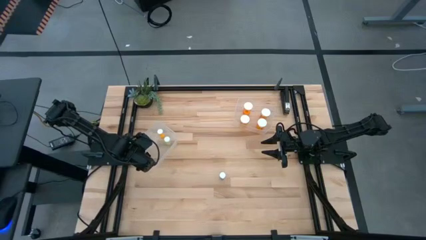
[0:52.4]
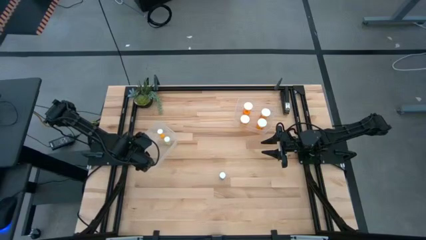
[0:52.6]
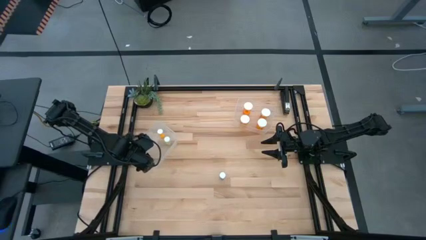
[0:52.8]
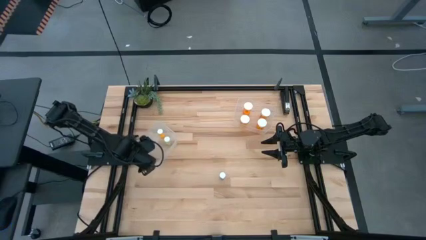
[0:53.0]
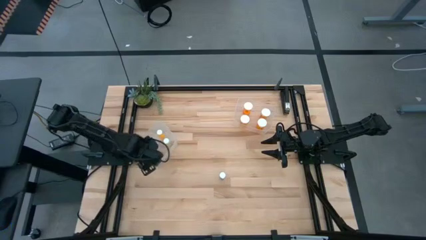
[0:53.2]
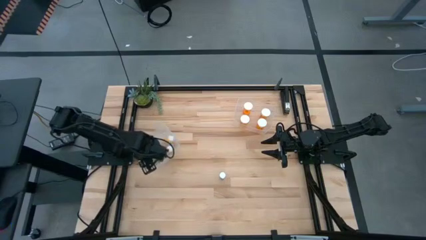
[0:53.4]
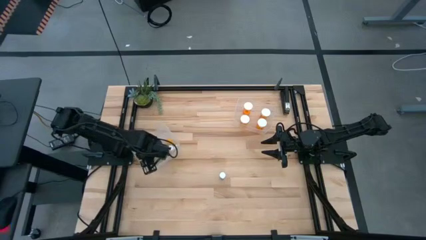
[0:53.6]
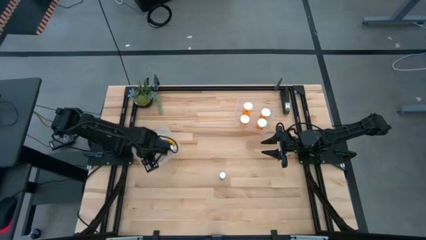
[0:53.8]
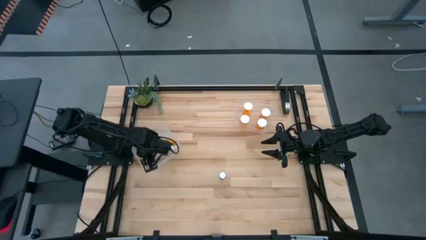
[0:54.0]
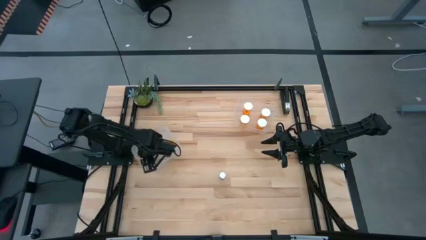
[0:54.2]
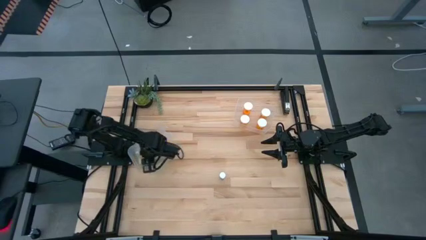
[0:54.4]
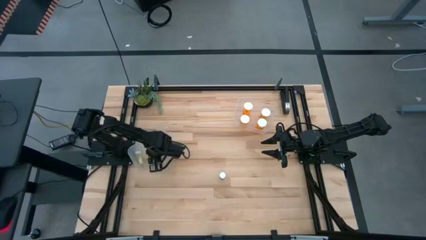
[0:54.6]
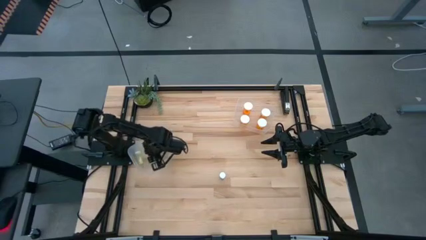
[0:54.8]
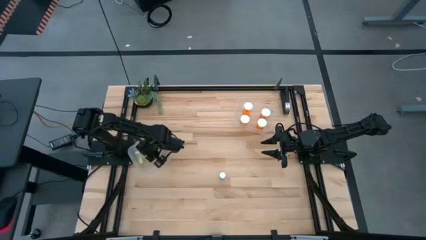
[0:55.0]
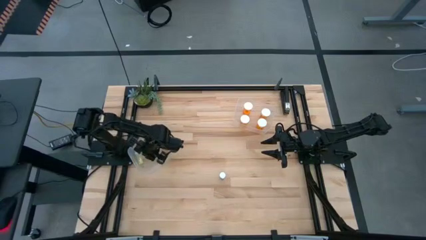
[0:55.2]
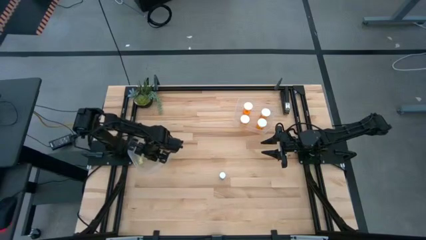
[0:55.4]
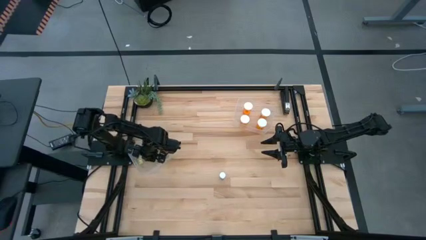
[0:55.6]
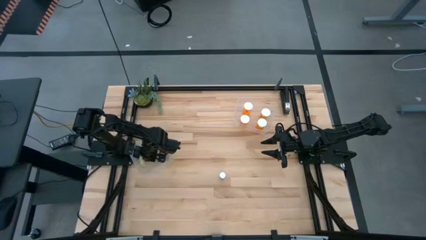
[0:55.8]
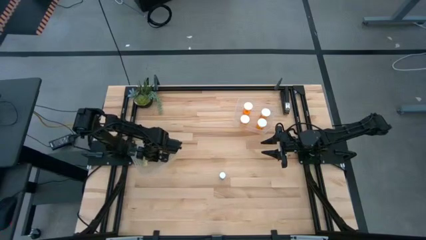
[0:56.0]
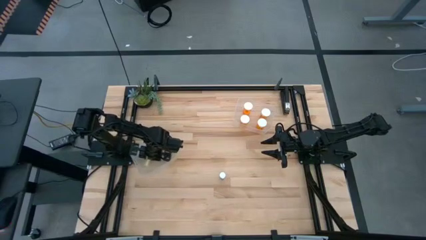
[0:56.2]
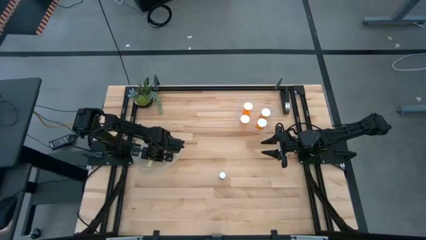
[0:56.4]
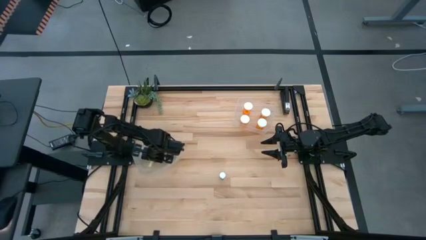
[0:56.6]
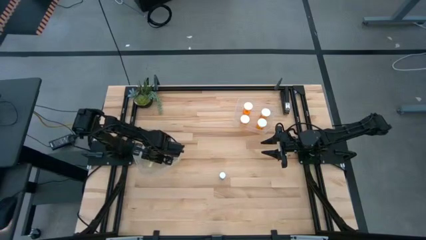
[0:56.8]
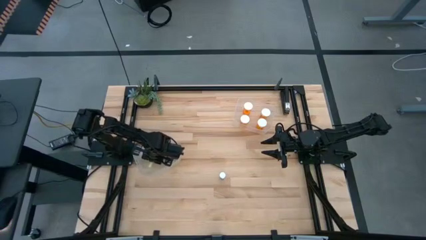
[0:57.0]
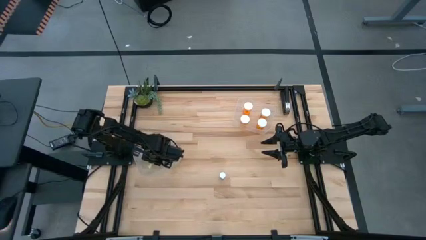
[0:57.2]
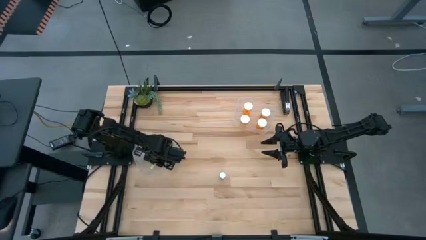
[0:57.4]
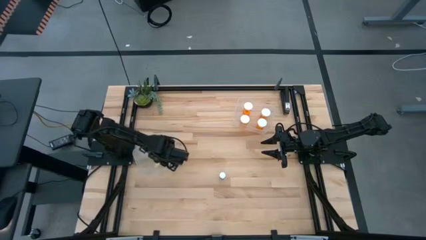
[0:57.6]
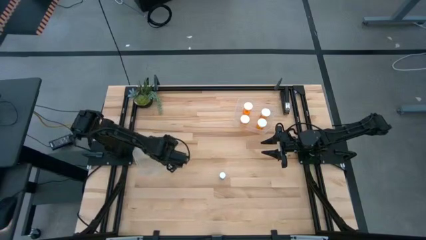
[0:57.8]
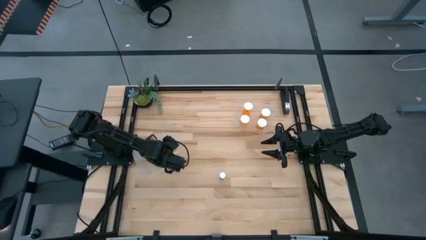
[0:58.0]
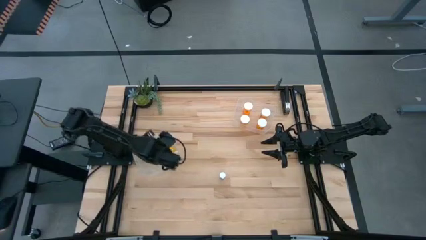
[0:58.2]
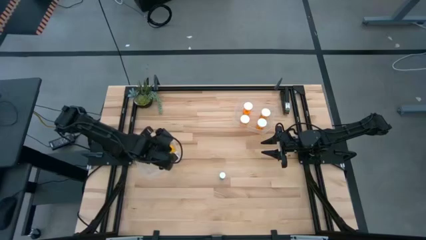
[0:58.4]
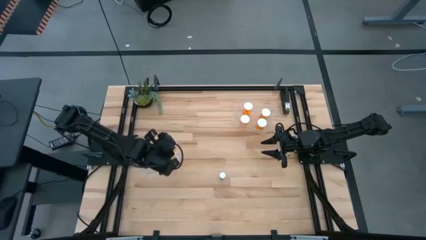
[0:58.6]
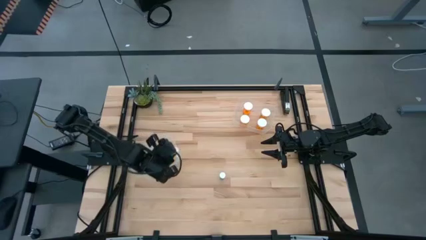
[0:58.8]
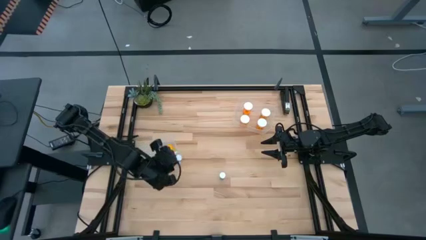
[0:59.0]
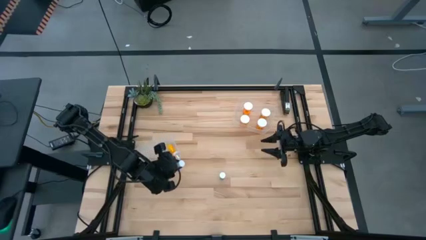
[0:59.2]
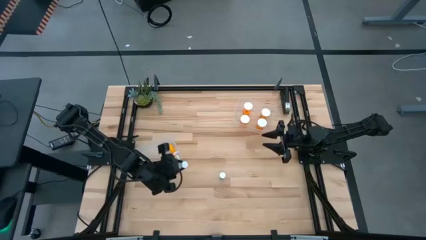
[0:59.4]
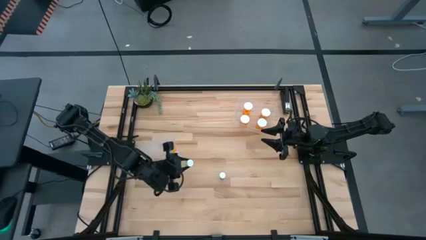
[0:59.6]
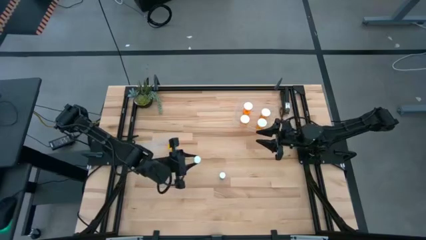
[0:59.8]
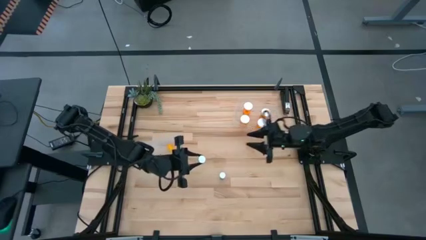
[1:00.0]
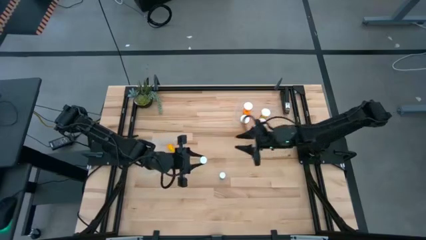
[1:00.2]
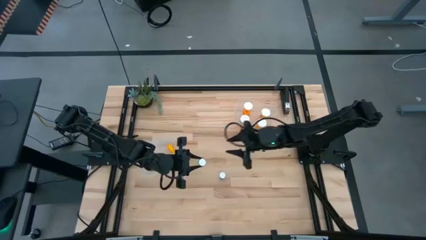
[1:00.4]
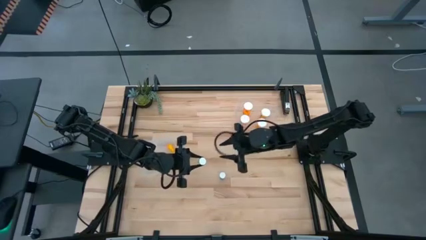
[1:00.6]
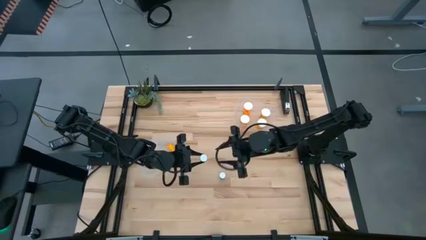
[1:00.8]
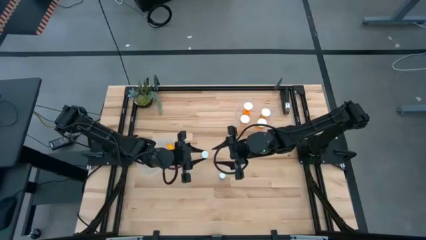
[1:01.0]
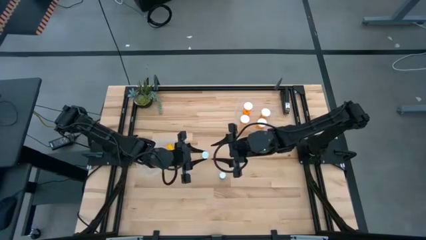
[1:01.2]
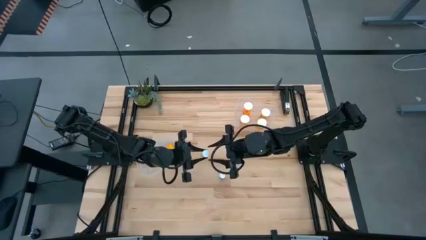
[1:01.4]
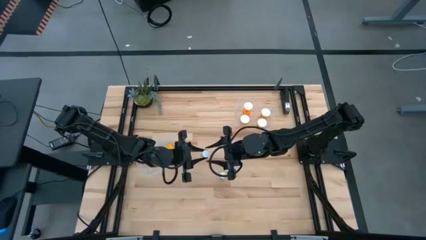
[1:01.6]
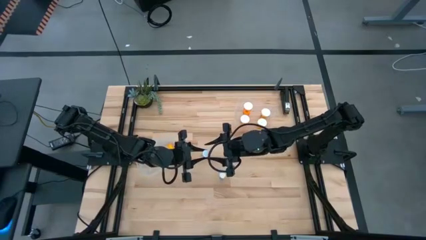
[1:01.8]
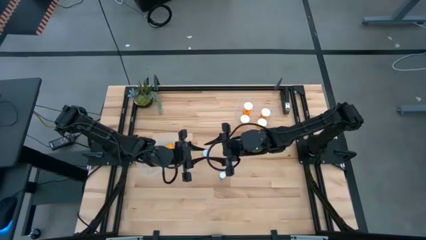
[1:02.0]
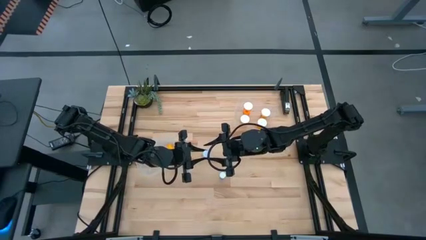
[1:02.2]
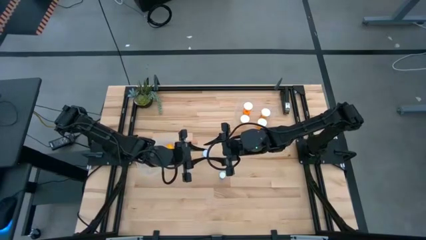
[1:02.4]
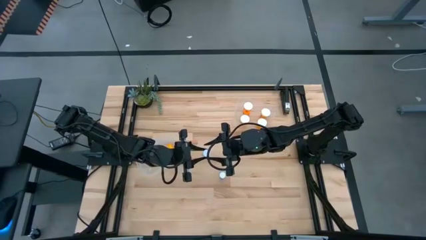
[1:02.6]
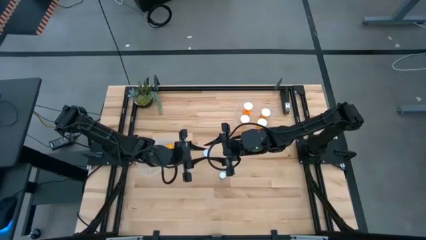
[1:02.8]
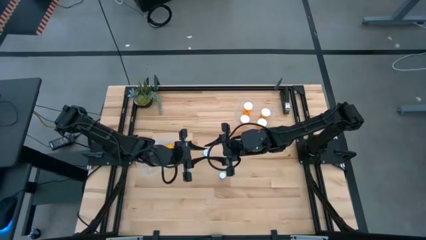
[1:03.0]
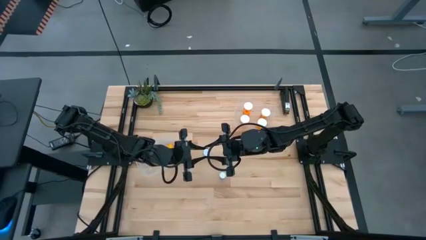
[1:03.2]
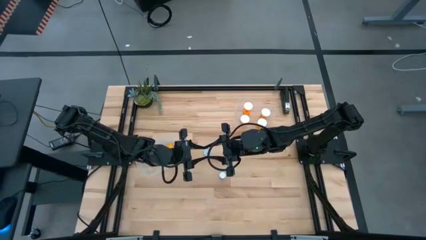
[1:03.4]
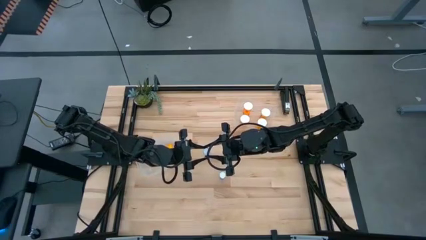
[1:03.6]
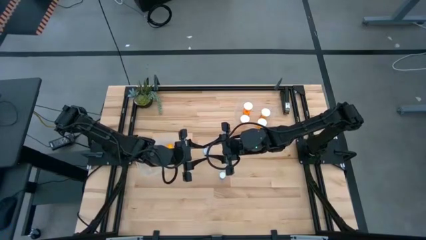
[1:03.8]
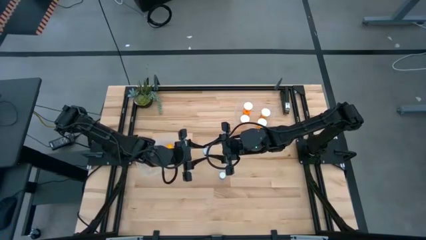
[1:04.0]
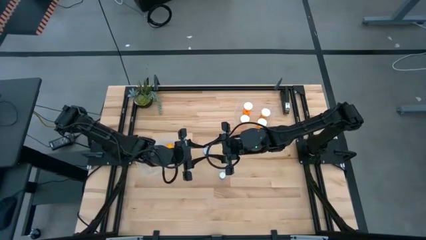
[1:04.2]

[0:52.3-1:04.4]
Task: Pick and place medicine bottles into bin by pill shape (circle, oval)
Remove small yellow pill bottle from the left transparent bin

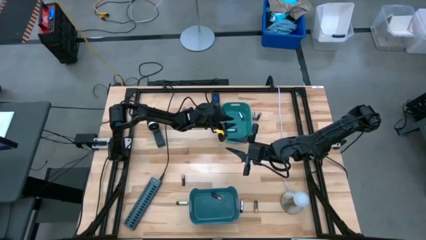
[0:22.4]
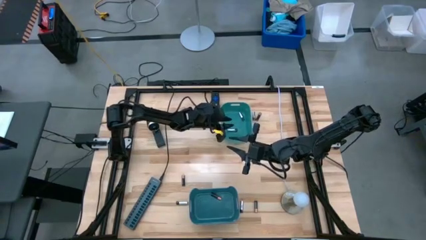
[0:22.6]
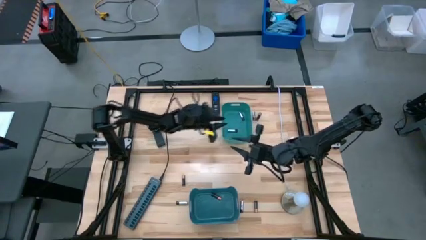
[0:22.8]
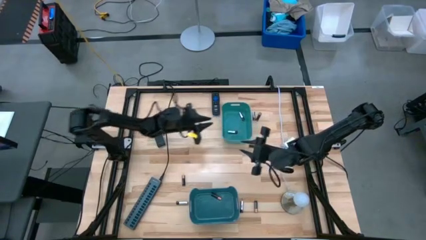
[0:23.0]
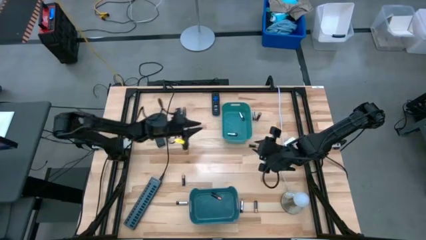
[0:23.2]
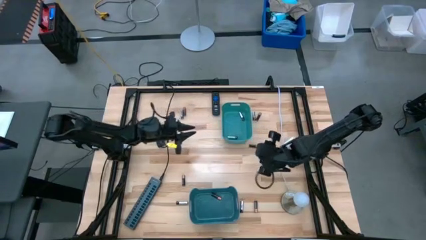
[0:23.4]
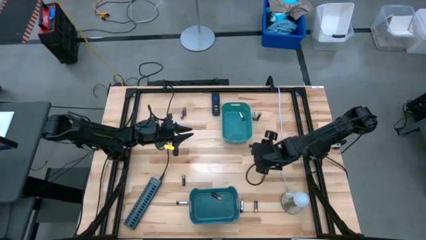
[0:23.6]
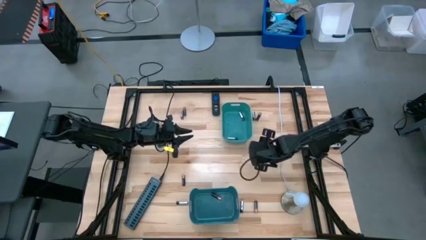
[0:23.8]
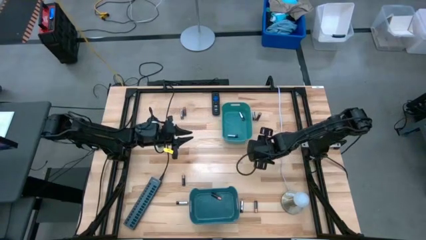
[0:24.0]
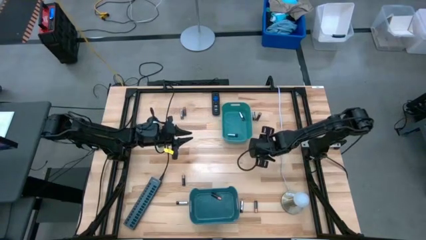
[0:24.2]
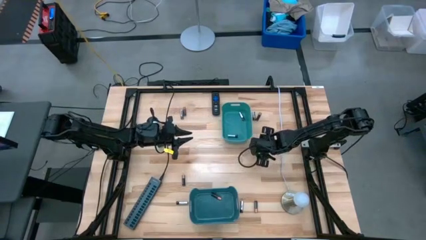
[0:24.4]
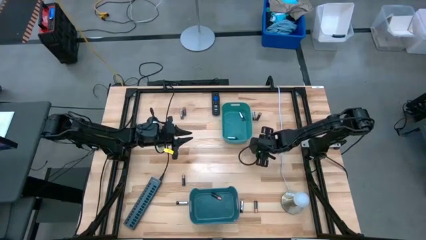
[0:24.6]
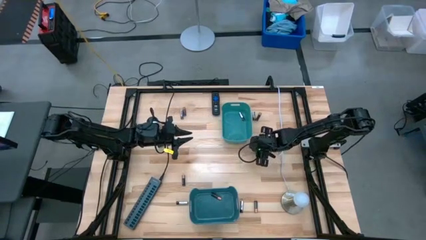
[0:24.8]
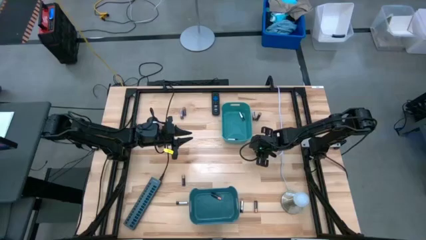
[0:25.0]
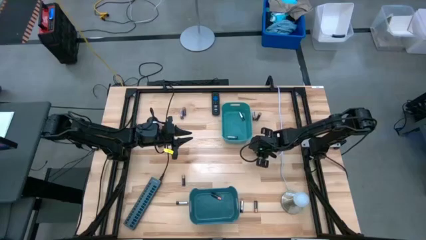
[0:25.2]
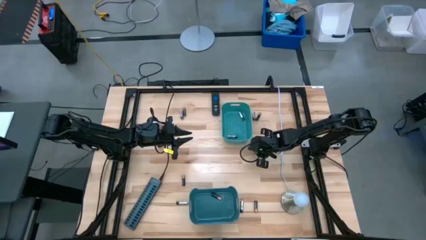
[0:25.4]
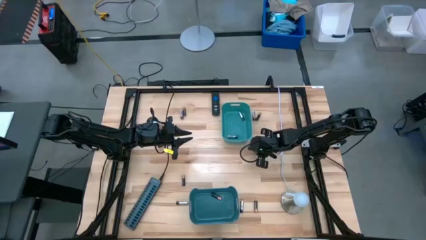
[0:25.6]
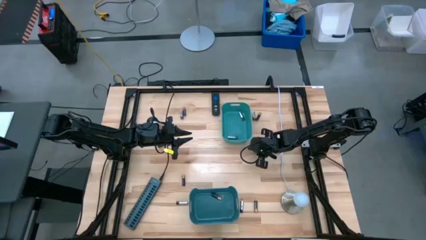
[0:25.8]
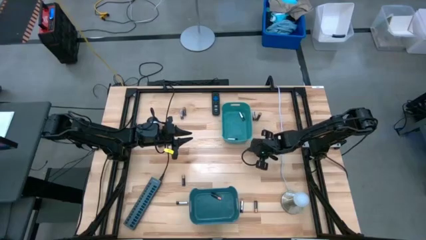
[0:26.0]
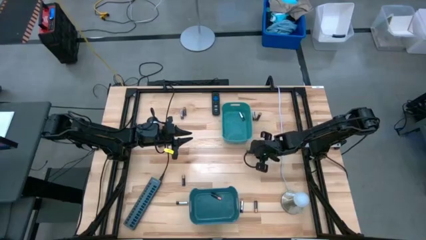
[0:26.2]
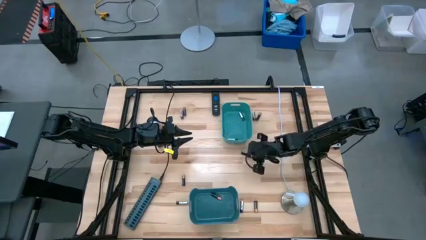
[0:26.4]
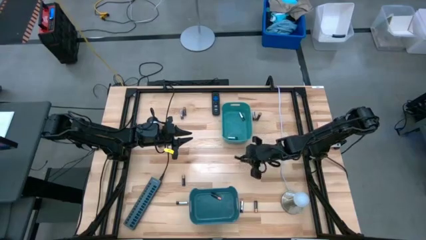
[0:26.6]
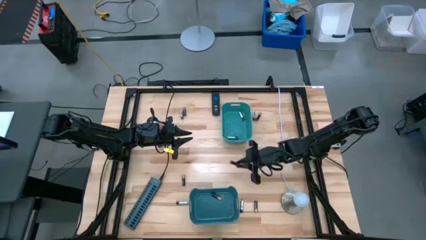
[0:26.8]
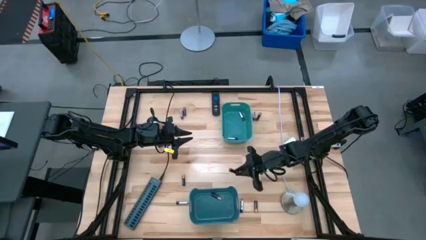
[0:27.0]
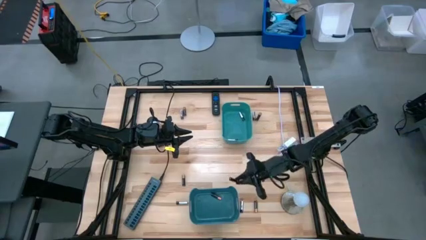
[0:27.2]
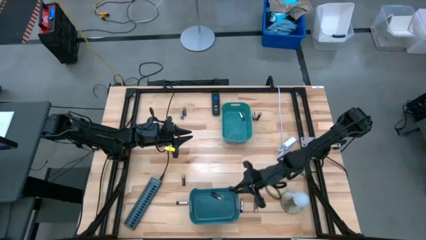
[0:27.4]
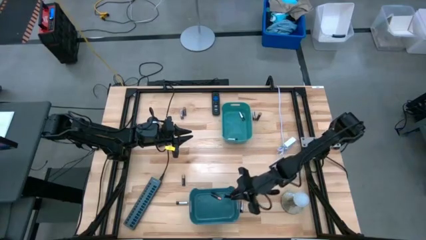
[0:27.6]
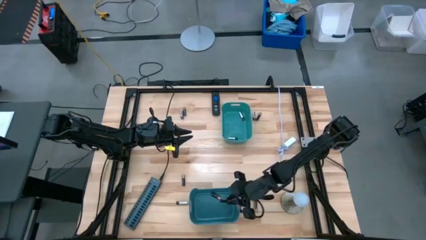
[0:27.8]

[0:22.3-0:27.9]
Task: Sort batteries
Put the black battery into the blue bin
